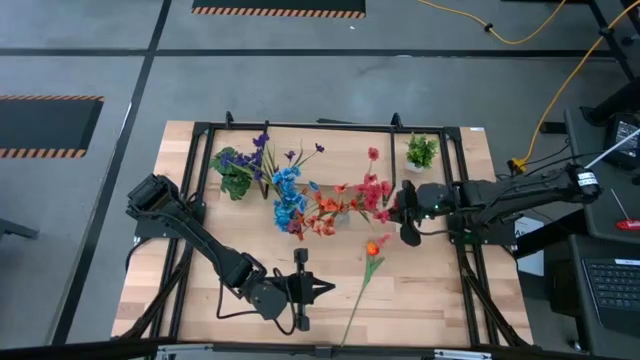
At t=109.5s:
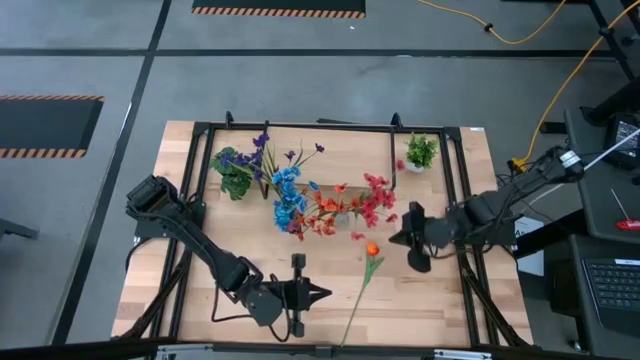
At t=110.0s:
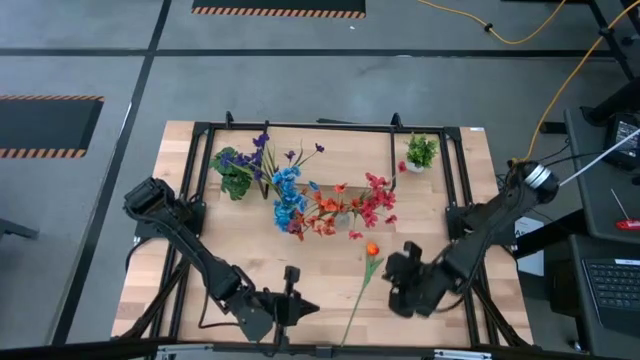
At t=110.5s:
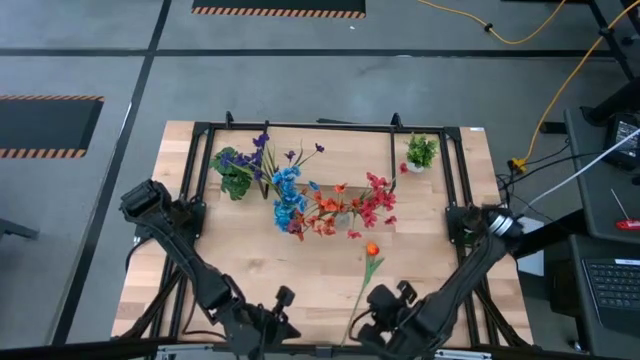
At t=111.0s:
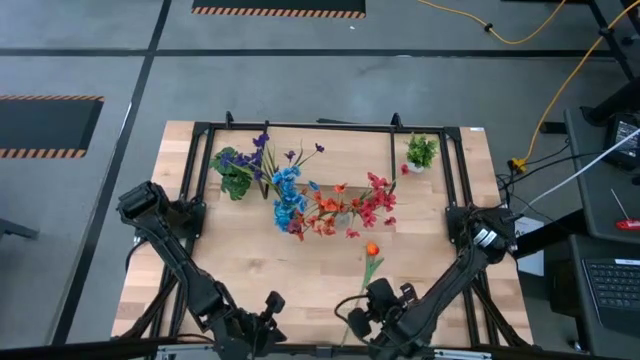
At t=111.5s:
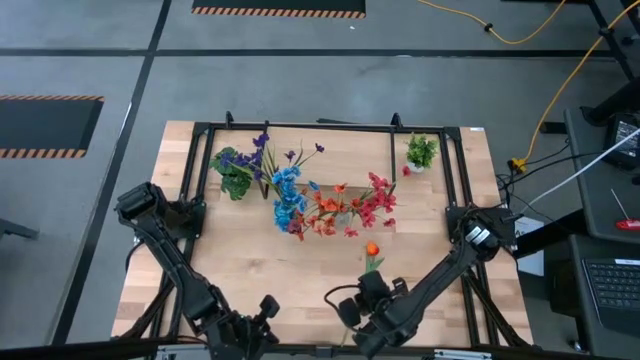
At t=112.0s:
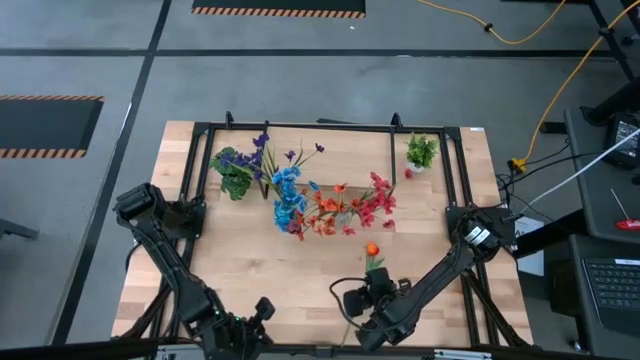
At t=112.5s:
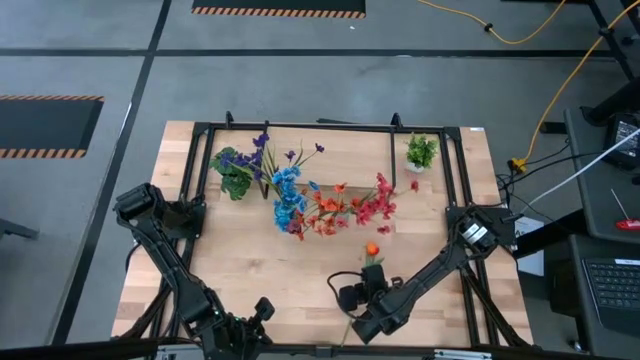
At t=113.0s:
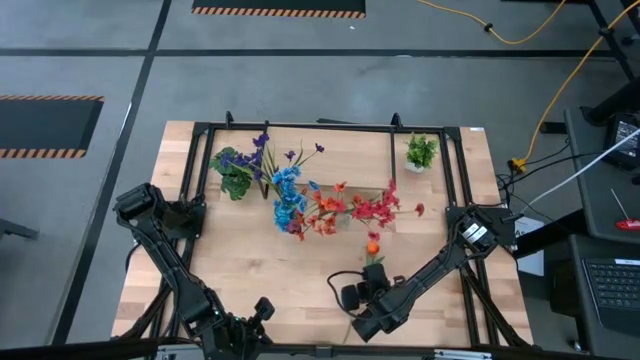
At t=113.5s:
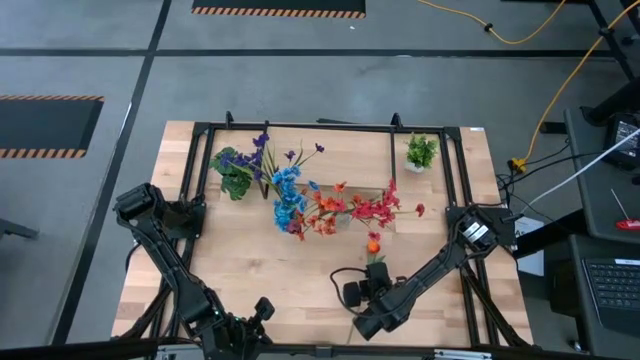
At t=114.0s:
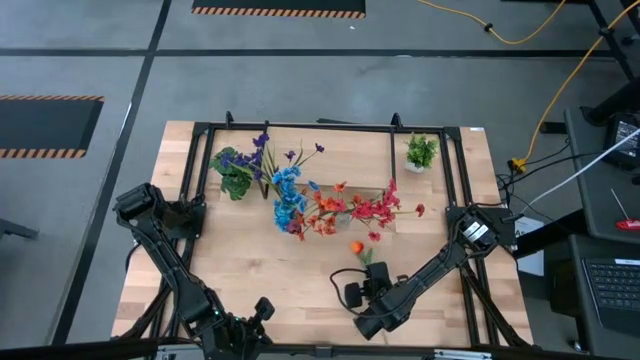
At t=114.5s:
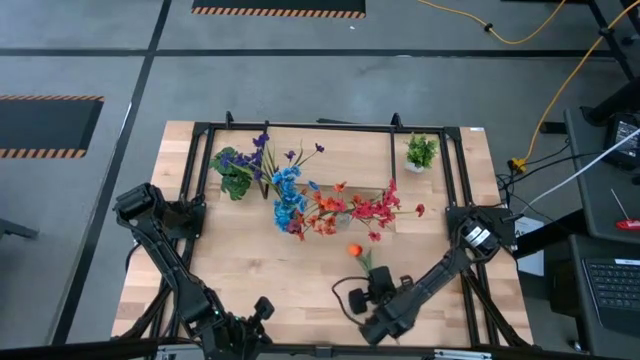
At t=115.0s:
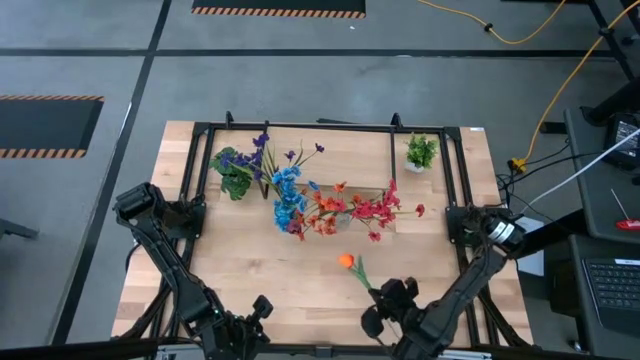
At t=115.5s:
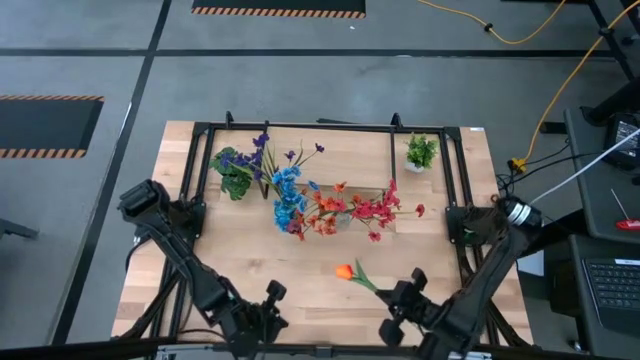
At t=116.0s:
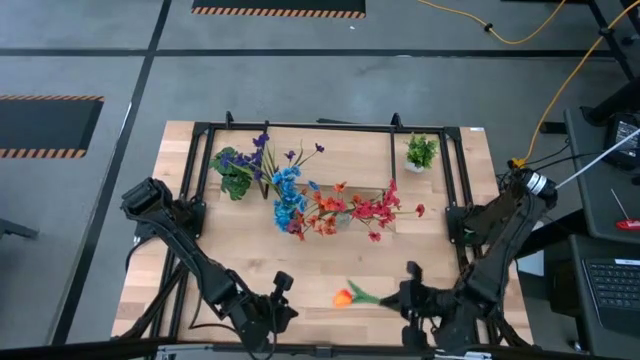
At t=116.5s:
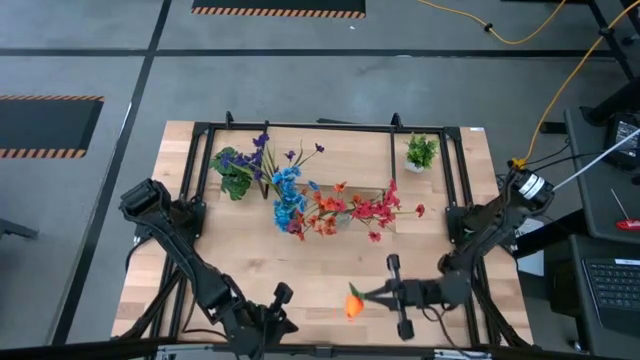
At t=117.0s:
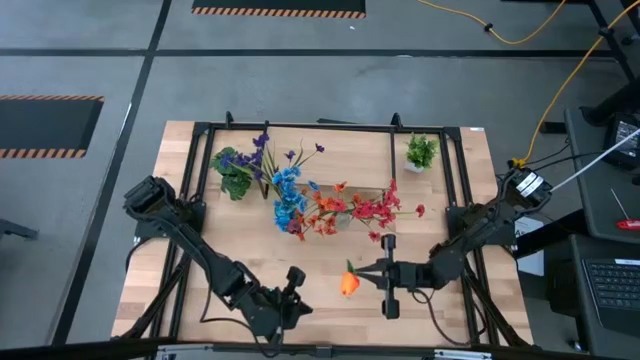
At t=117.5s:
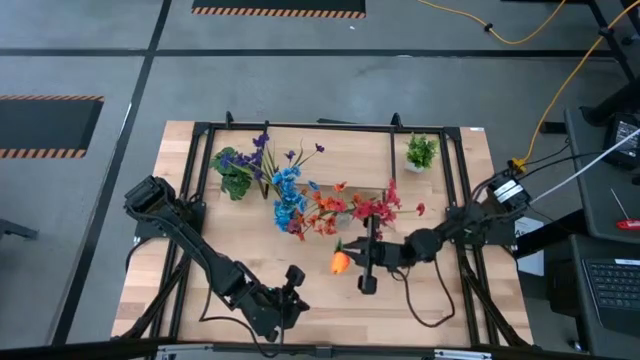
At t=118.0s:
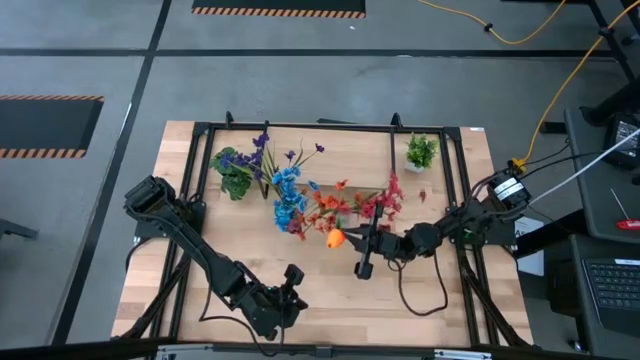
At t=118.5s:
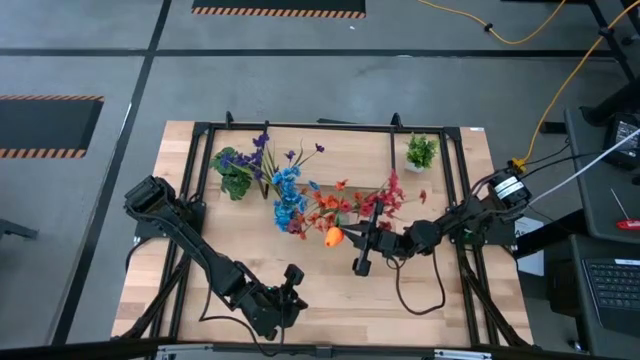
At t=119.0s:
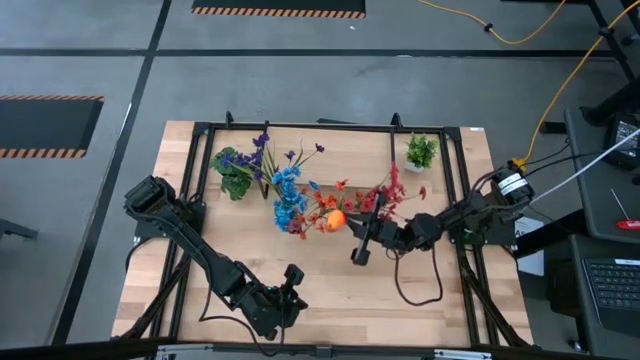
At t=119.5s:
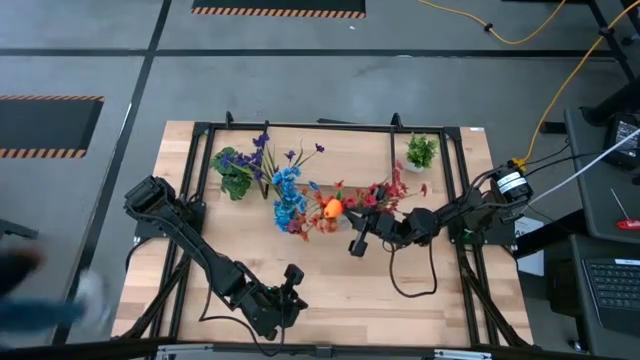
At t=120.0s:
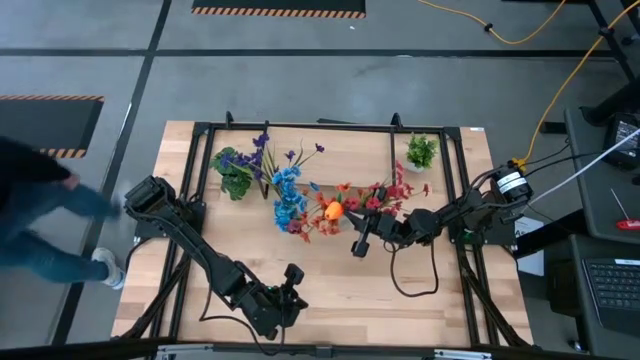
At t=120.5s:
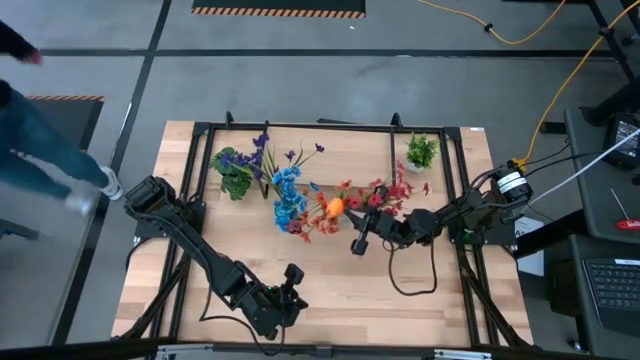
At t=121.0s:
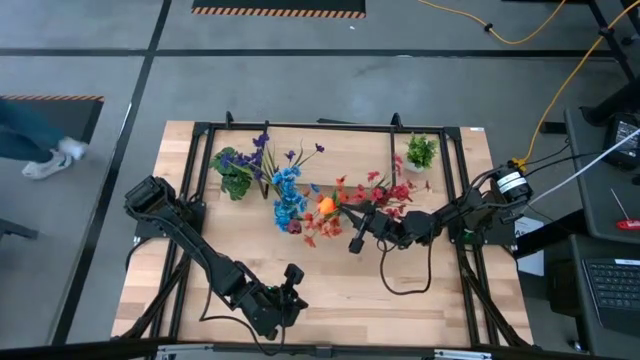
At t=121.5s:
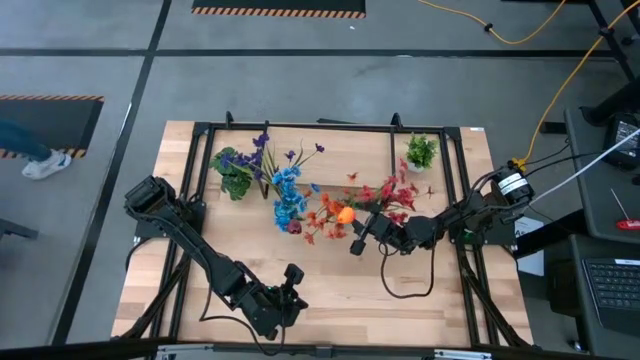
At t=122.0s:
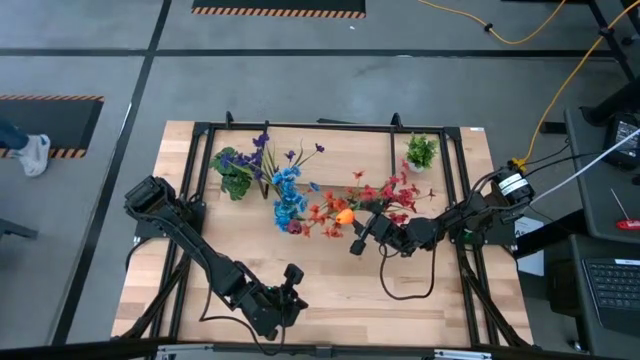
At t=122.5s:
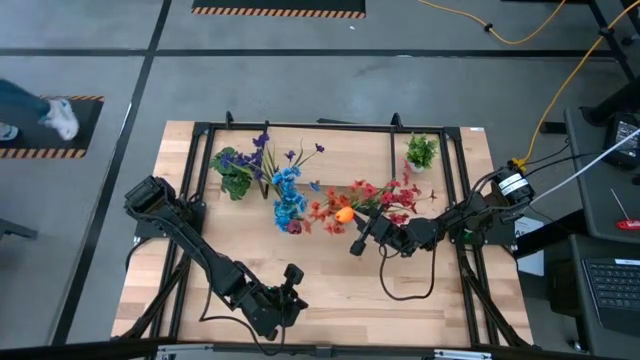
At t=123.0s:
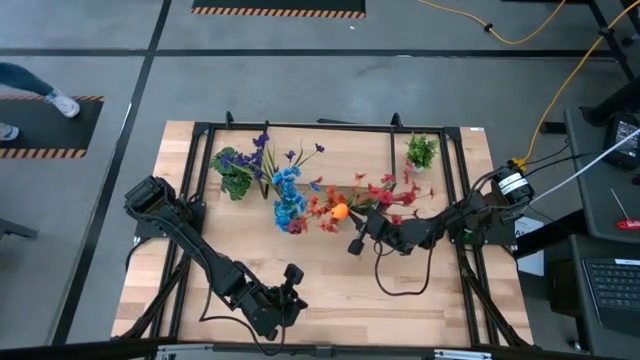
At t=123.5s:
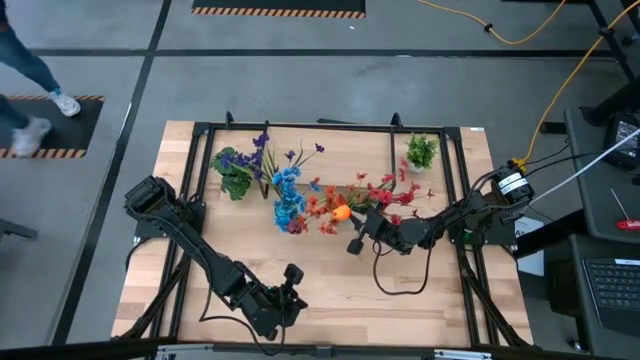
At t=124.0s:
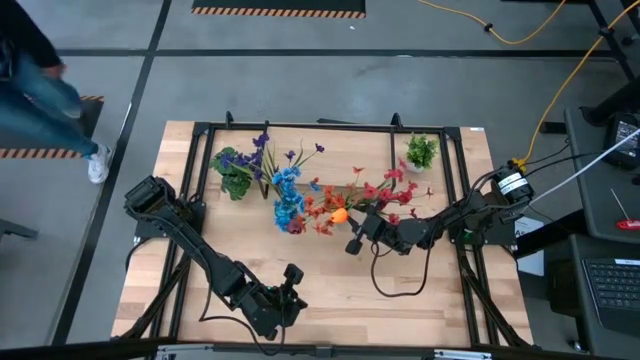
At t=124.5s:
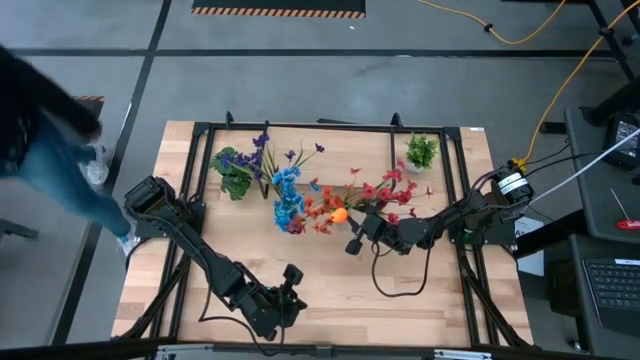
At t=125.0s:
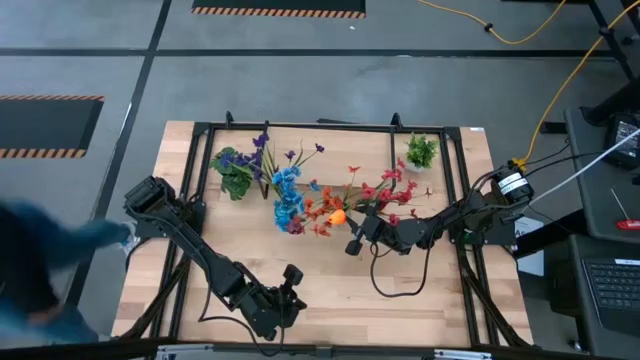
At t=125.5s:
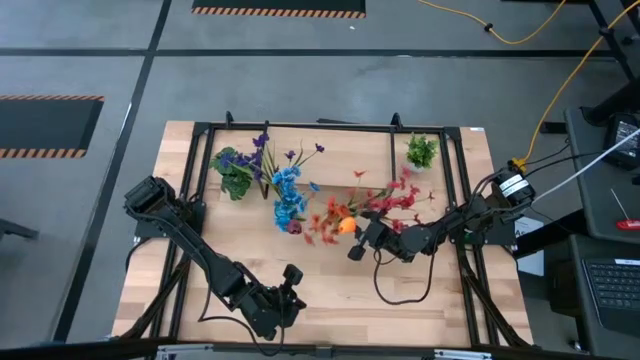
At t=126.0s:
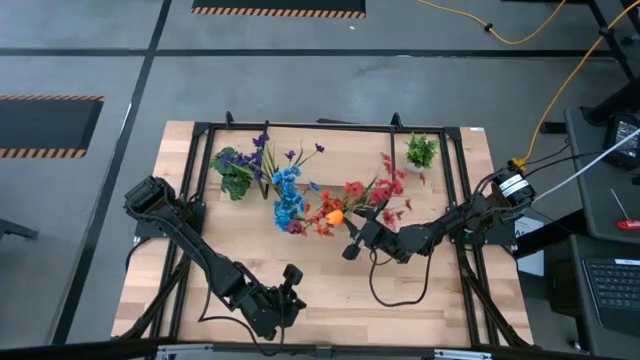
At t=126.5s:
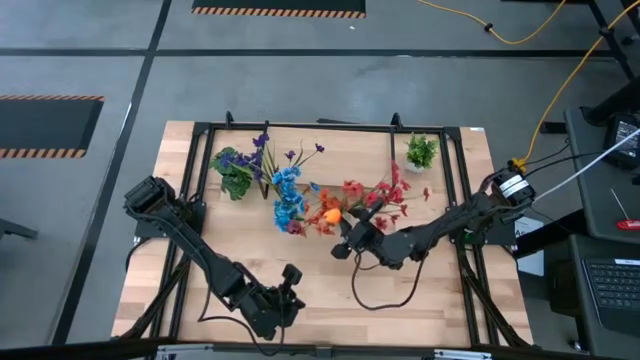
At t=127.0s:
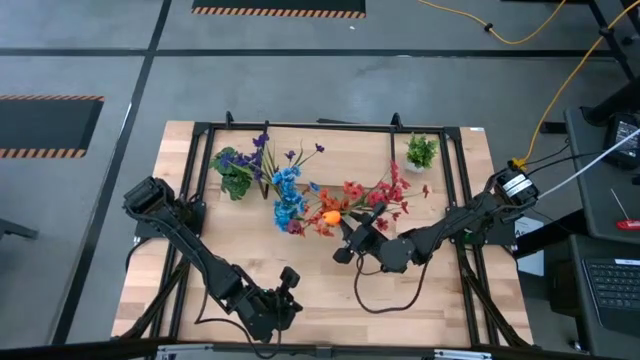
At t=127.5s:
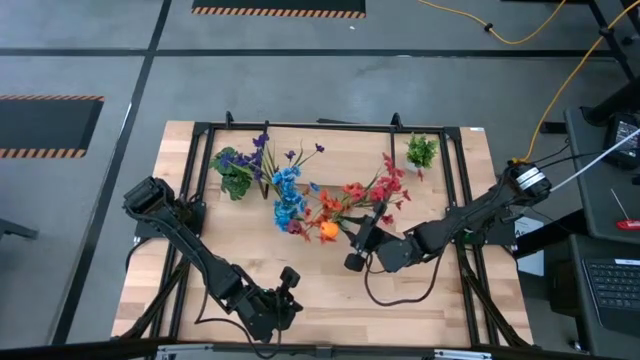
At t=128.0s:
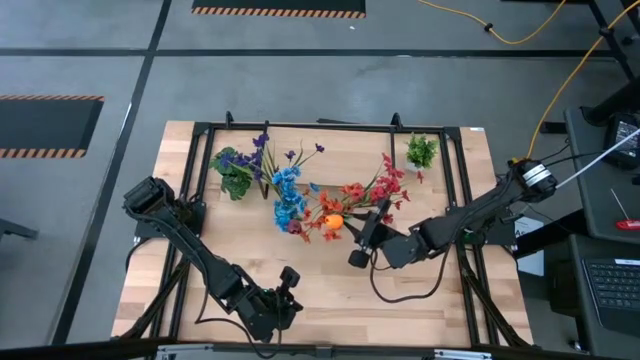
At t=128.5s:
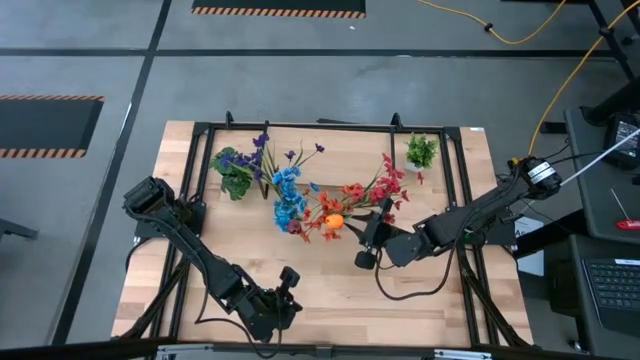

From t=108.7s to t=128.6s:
Task: Pick and place flowers into a vace then onto a shelf
Put the red orange flower into the transparent vase

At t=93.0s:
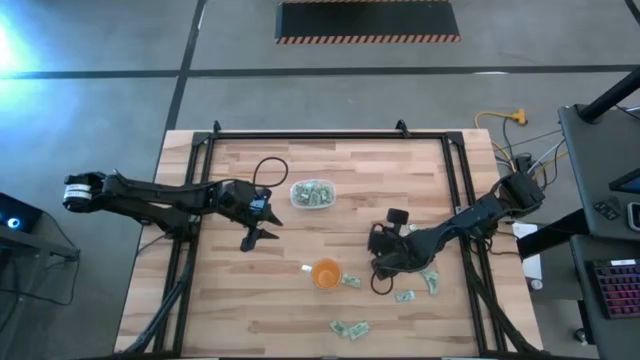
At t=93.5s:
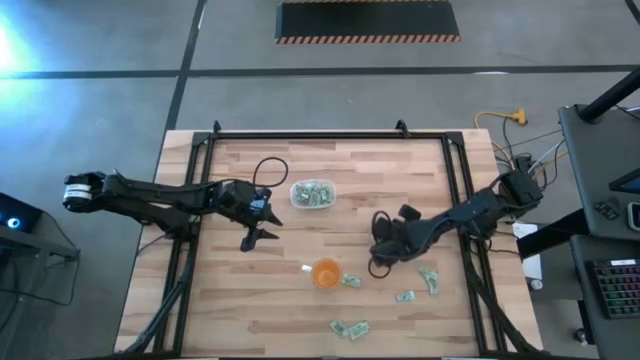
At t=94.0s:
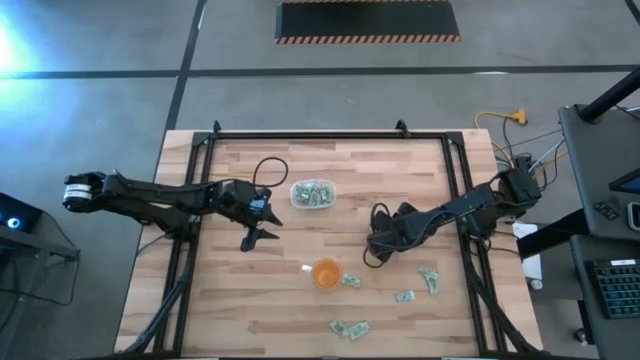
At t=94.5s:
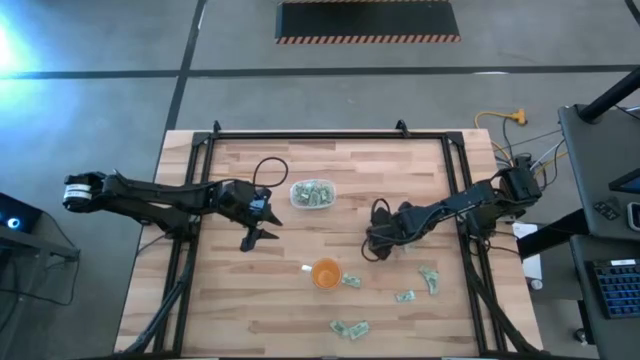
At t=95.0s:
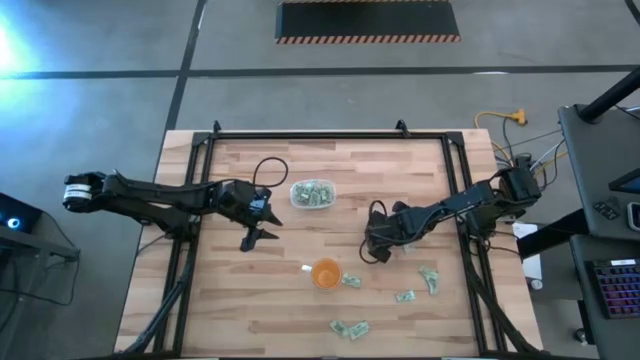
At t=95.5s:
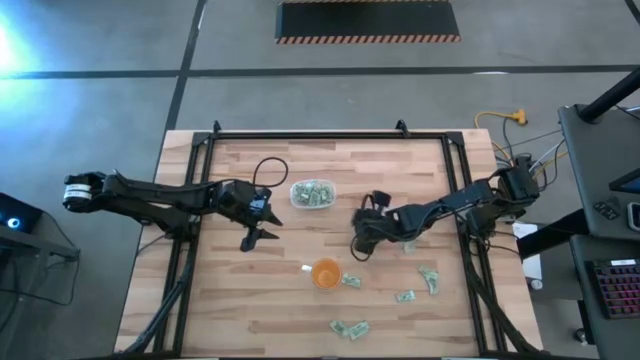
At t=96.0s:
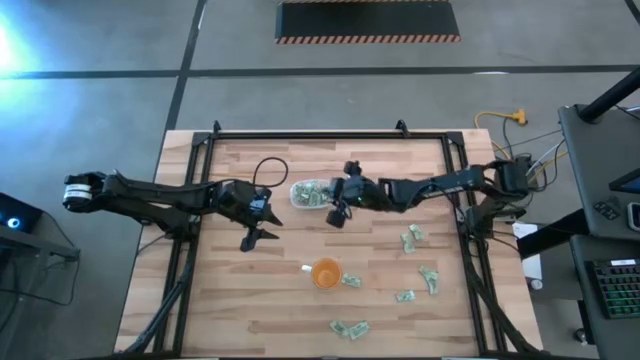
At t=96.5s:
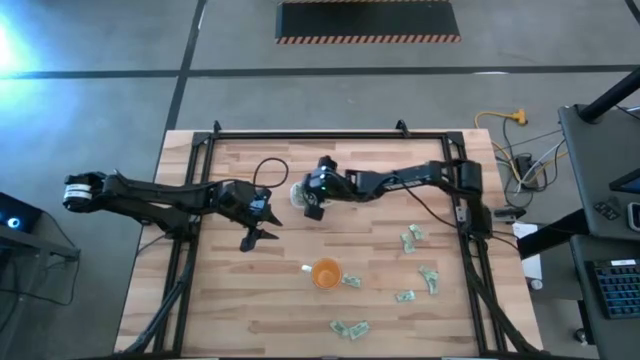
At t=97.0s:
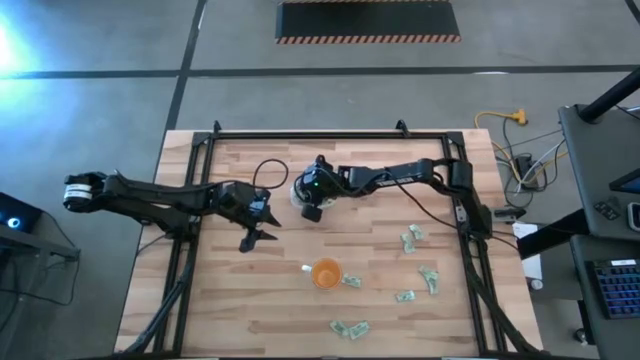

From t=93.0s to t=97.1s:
Task: Pick and place Stevia / Truvia into bins
Put the stevia packet into the transparent bin
